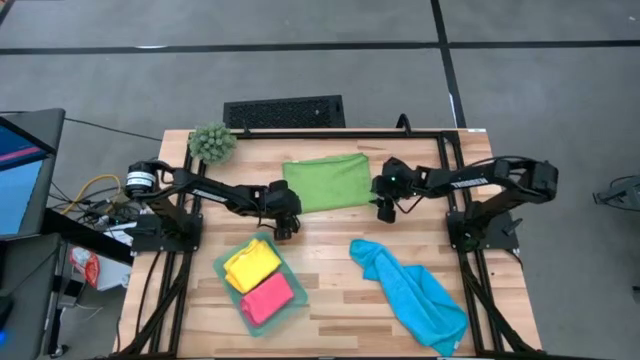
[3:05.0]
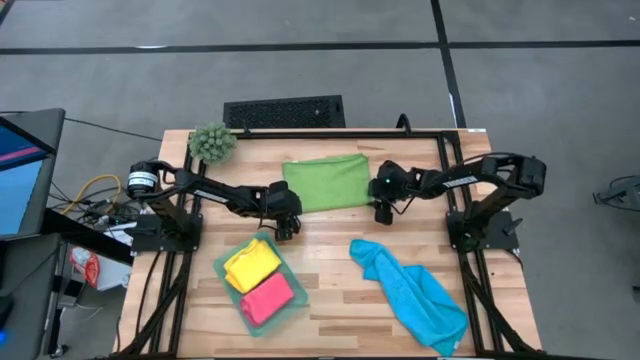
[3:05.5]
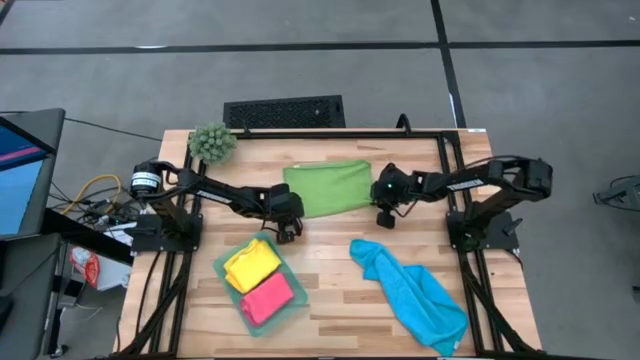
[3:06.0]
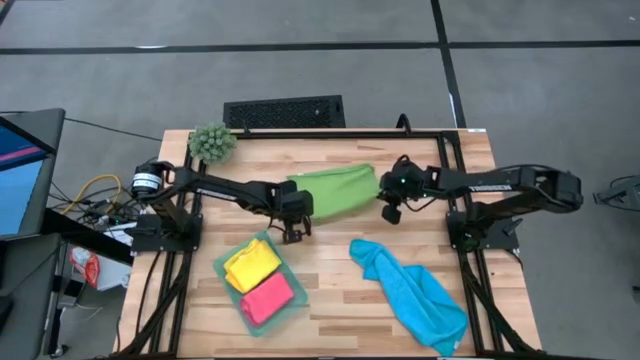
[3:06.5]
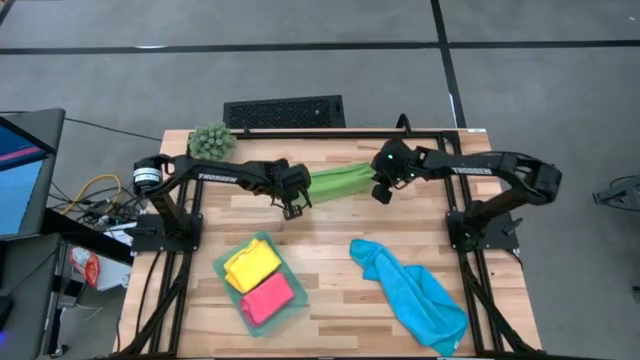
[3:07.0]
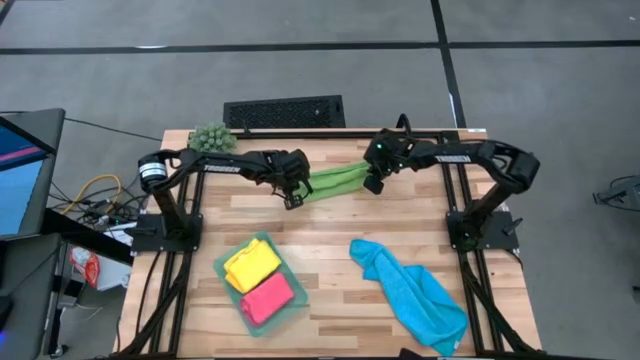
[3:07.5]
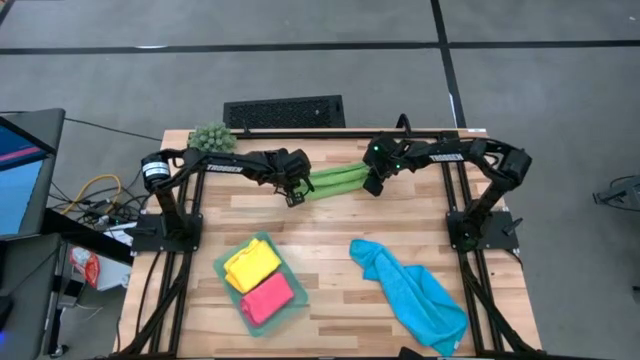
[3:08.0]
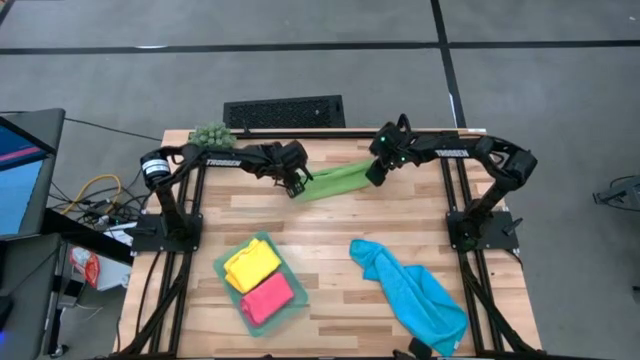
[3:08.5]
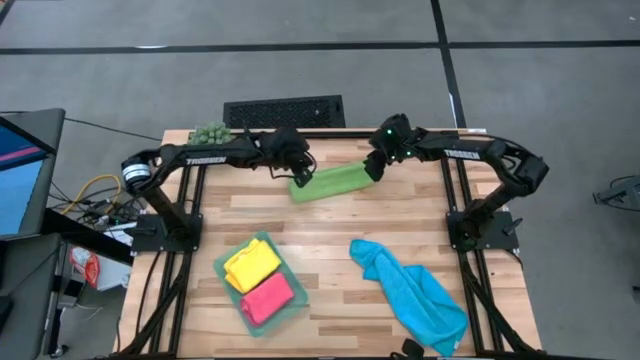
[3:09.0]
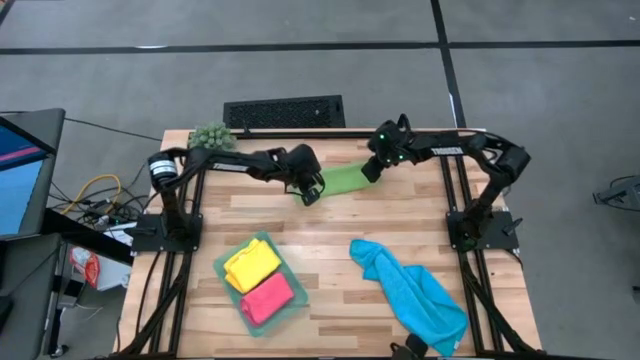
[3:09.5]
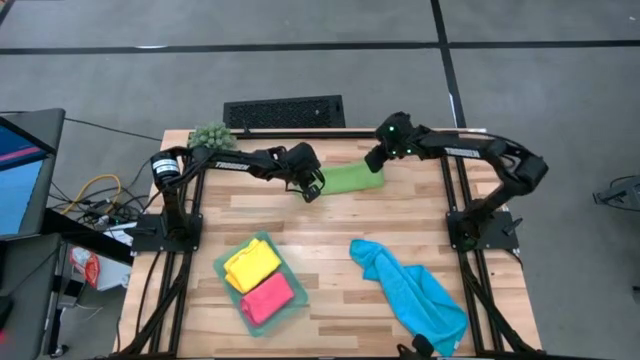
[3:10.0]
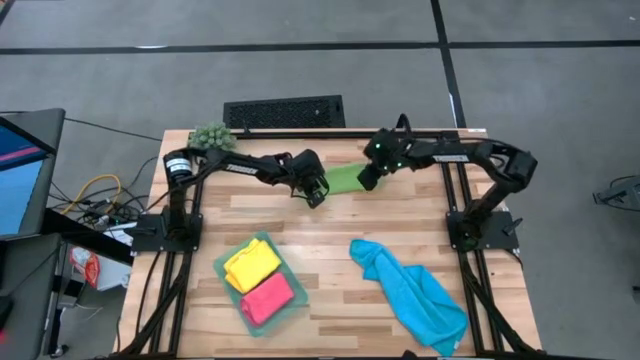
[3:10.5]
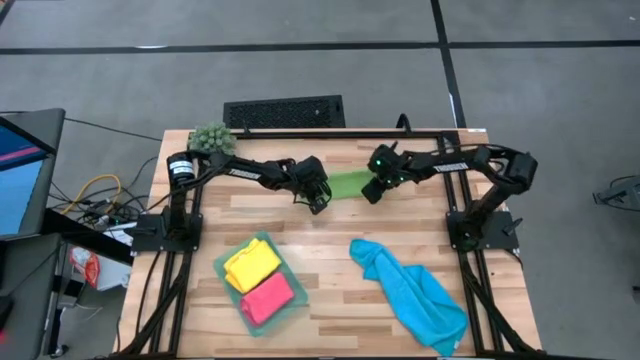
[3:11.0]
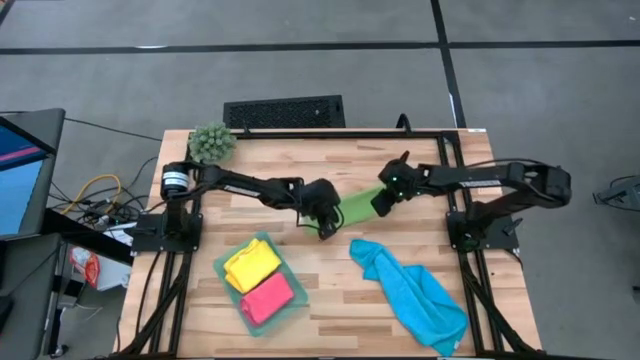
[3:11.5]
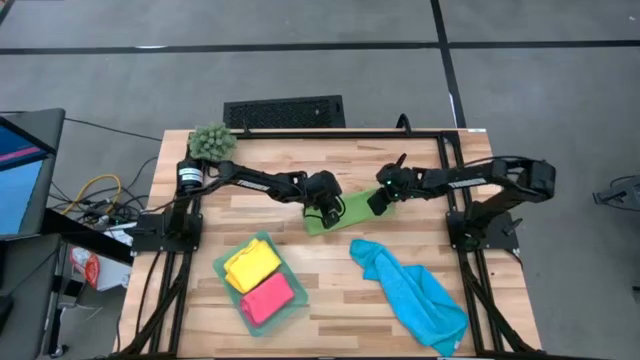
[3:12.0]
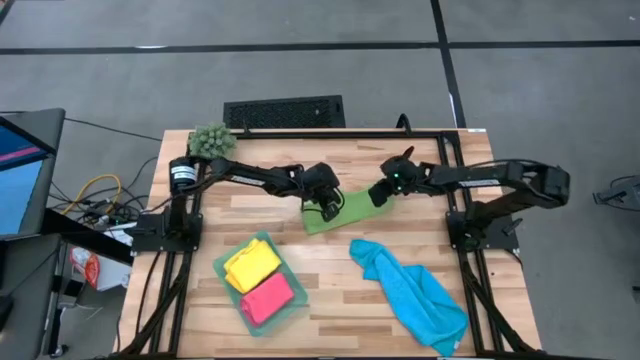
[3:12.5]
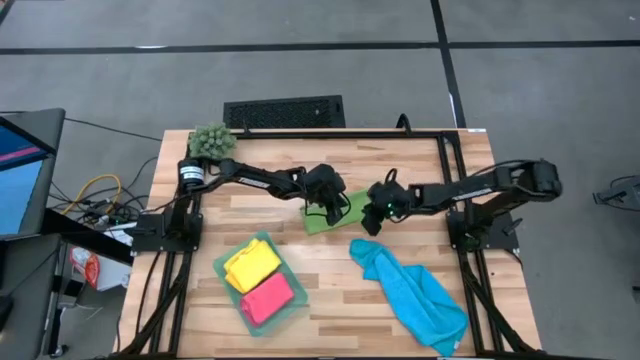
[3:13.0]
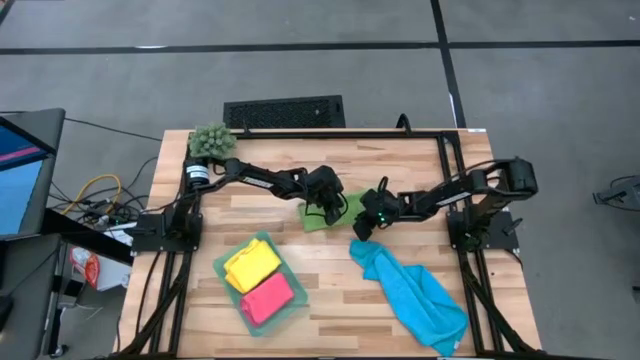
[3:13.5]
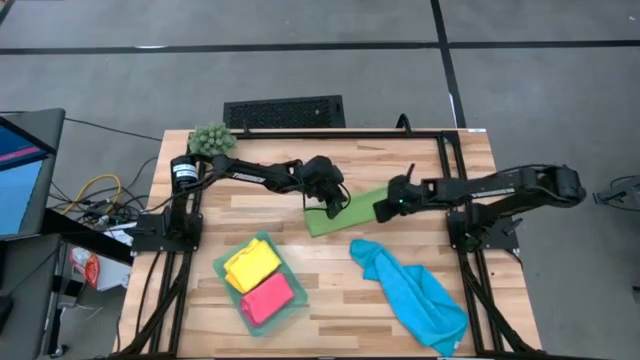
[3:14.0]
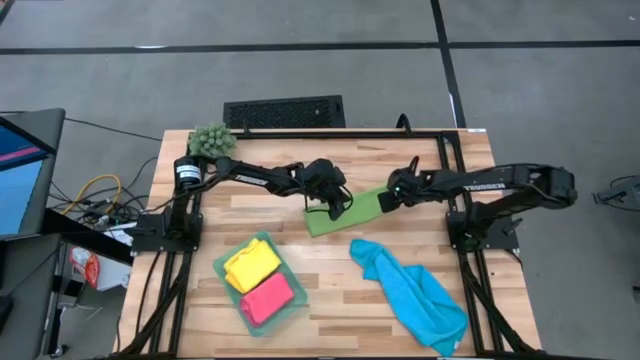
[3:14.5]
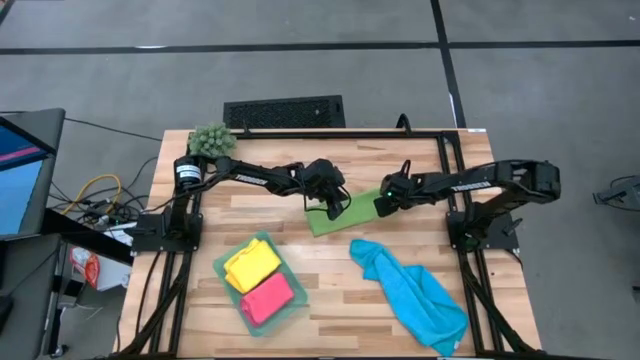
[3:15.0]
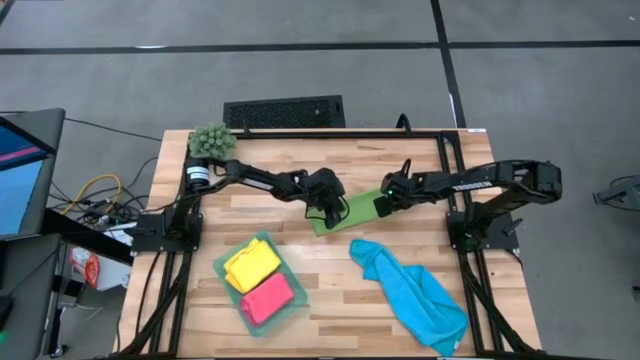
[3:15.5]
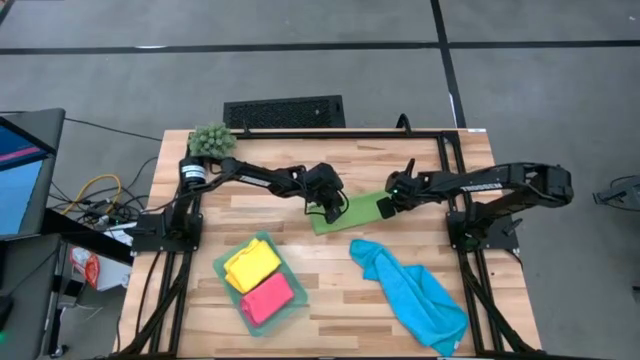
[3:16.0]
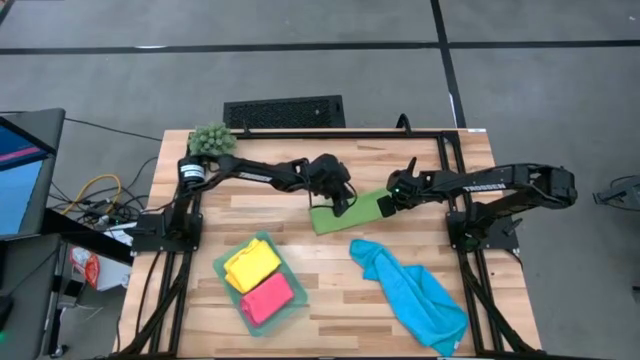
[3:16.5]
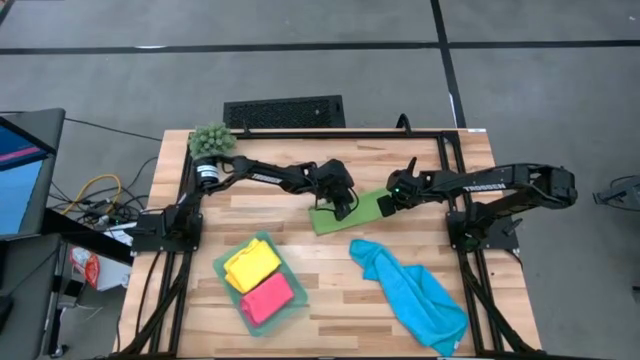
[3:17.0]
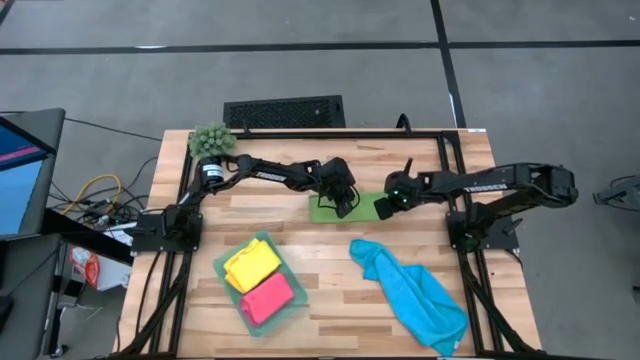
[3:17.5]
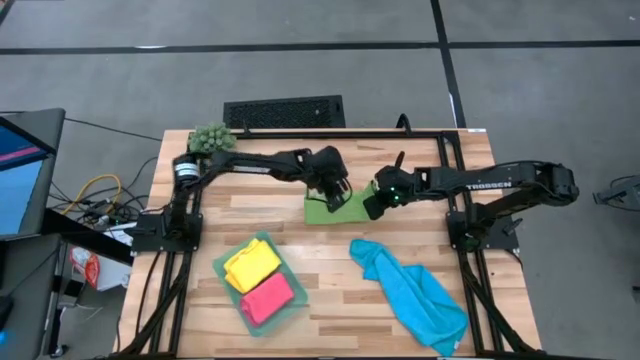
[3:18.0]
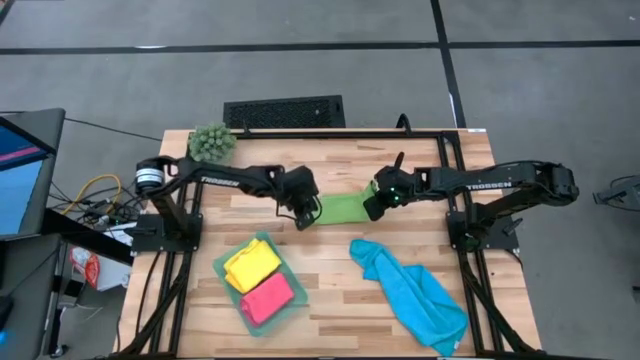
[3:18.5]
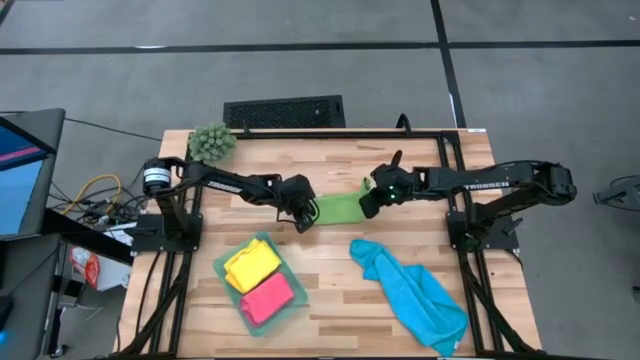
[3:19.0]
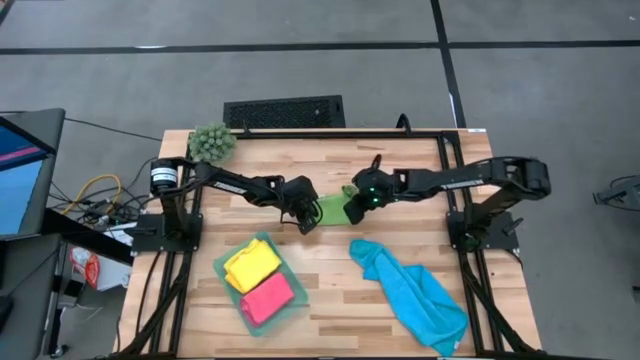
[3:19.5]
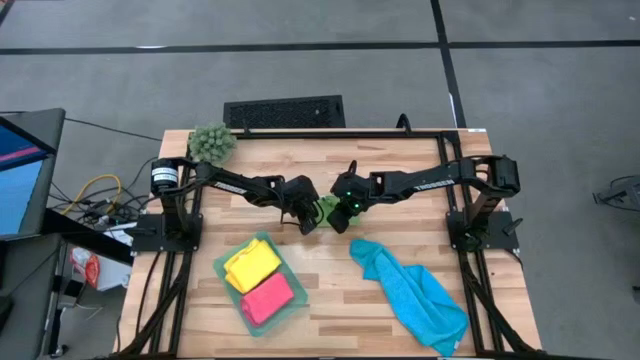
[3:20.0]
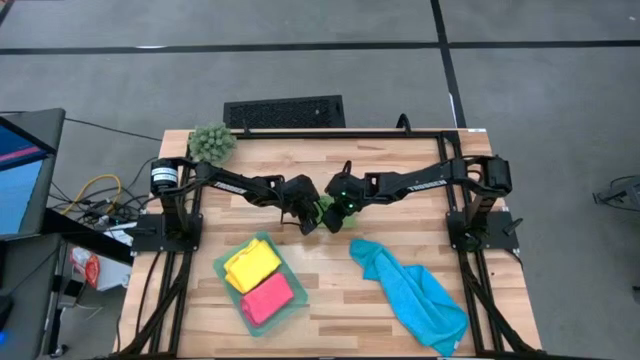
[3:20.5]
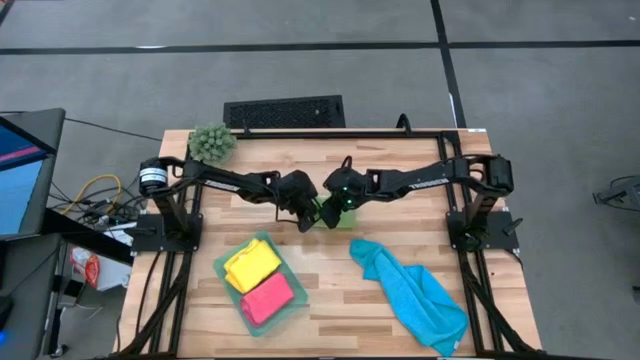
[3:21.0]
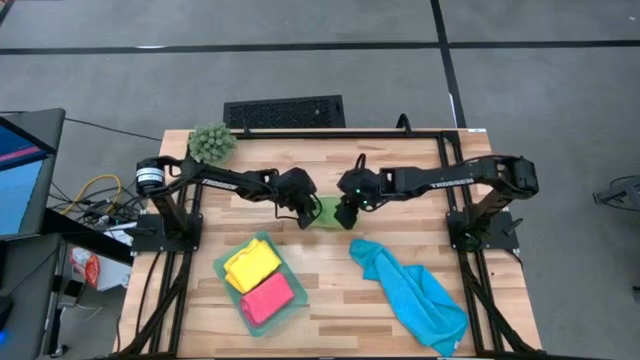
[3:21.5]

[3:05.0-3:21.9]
Task: Fold microfiber towels
Fold the green towel
